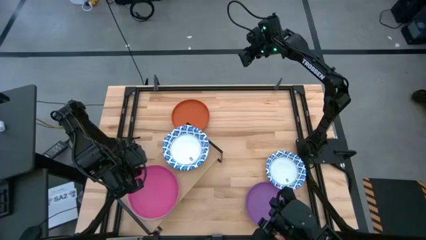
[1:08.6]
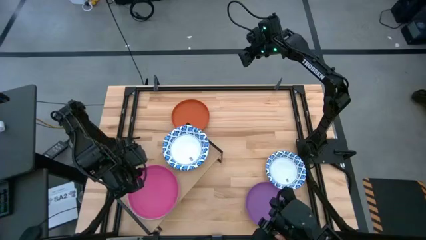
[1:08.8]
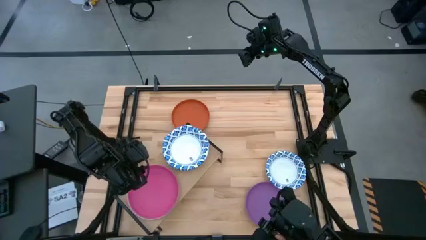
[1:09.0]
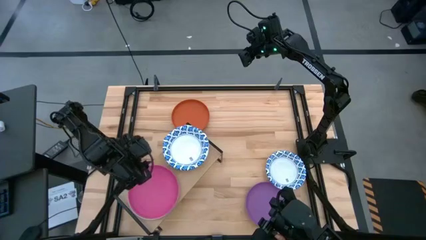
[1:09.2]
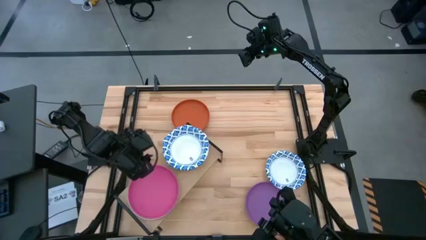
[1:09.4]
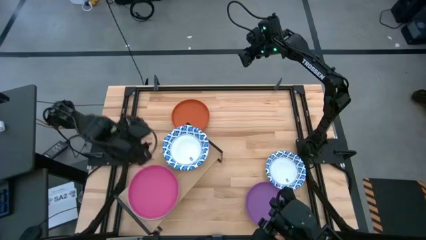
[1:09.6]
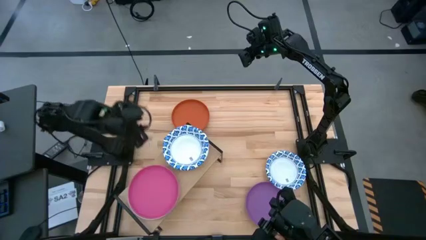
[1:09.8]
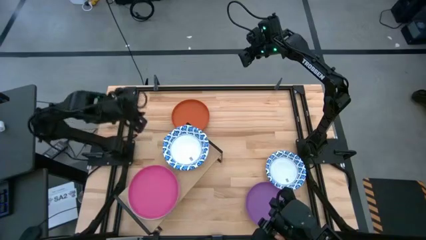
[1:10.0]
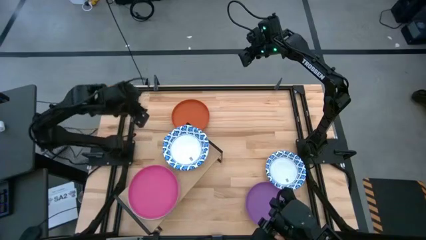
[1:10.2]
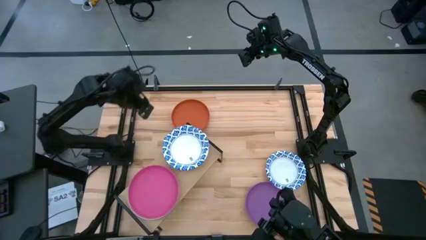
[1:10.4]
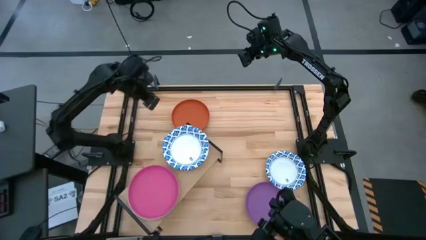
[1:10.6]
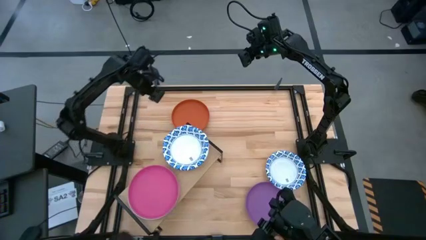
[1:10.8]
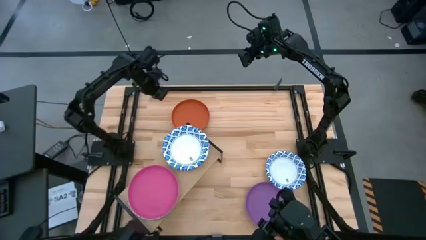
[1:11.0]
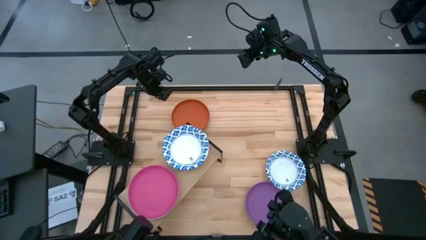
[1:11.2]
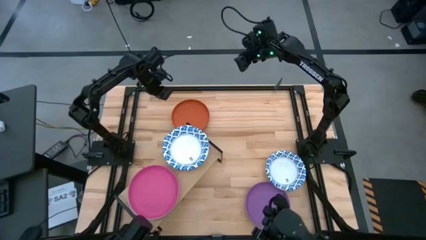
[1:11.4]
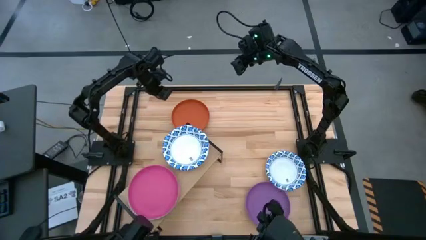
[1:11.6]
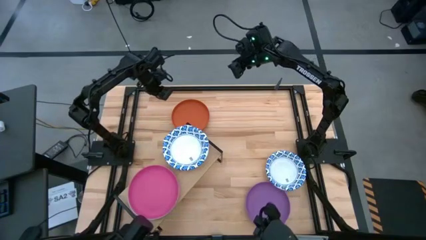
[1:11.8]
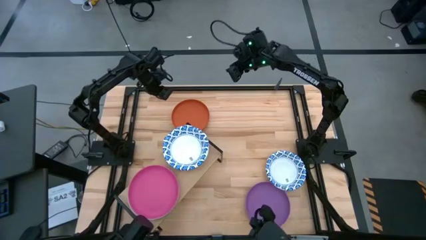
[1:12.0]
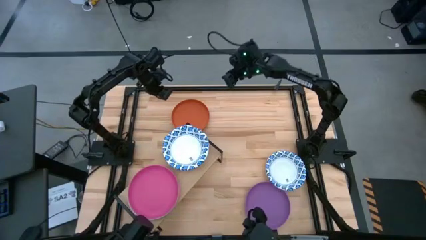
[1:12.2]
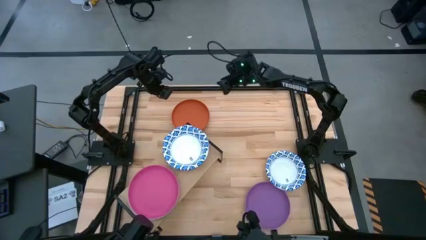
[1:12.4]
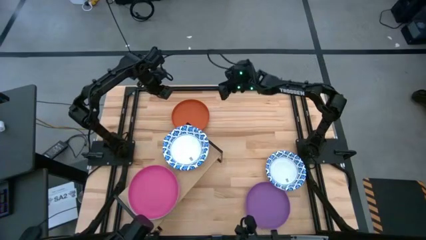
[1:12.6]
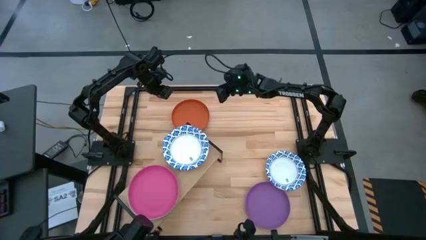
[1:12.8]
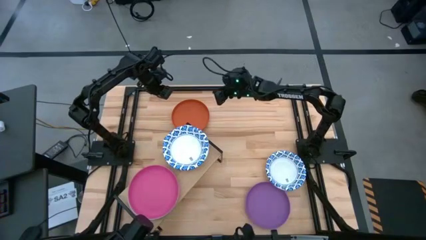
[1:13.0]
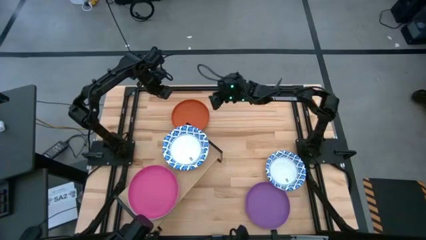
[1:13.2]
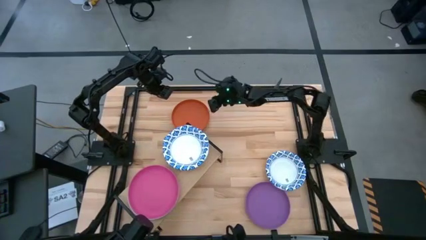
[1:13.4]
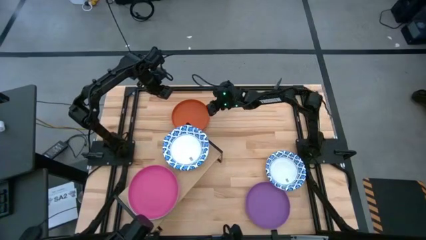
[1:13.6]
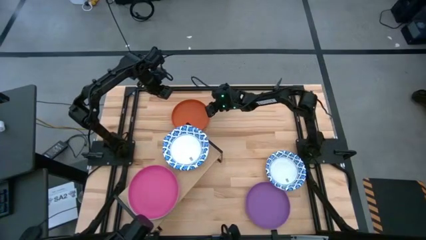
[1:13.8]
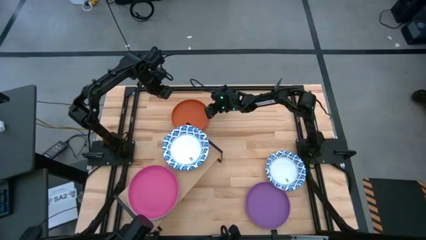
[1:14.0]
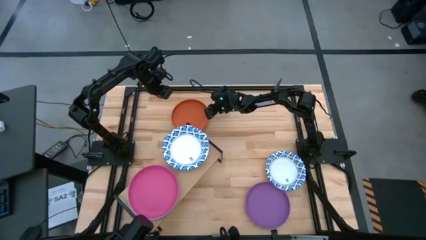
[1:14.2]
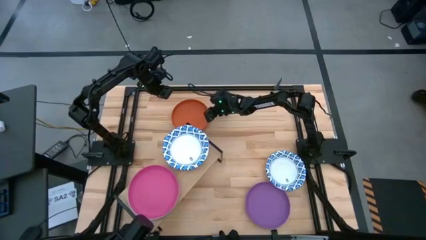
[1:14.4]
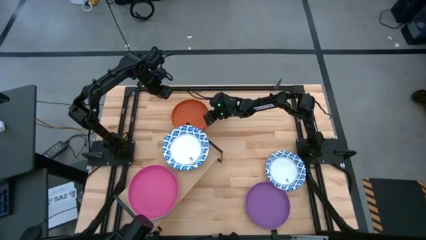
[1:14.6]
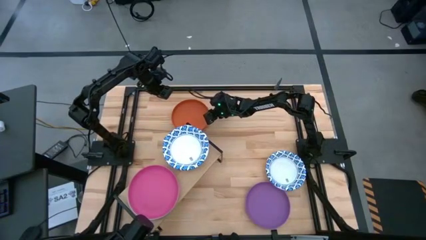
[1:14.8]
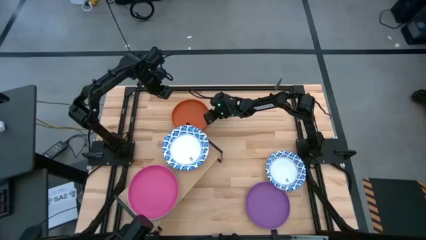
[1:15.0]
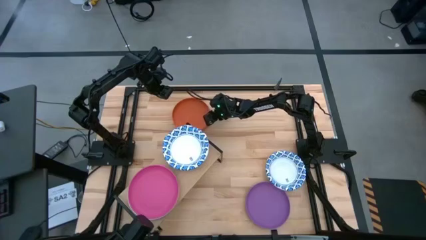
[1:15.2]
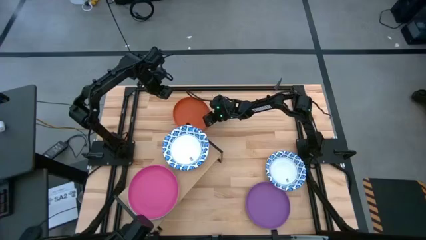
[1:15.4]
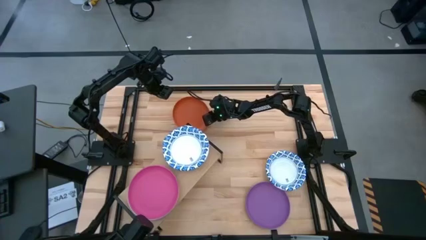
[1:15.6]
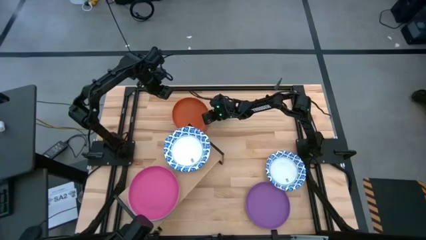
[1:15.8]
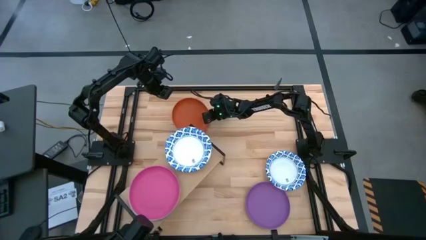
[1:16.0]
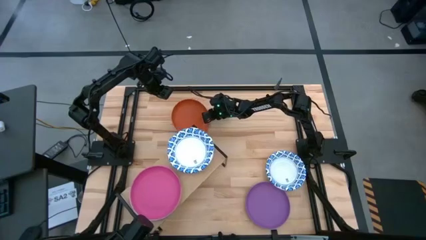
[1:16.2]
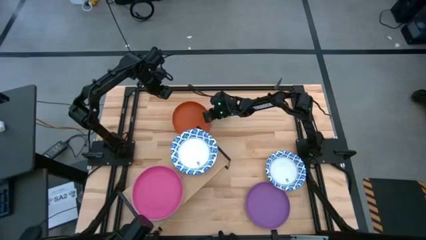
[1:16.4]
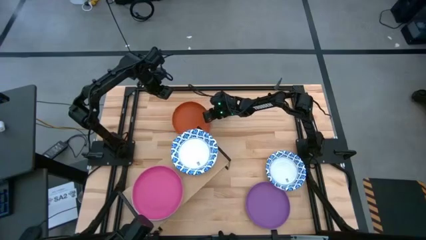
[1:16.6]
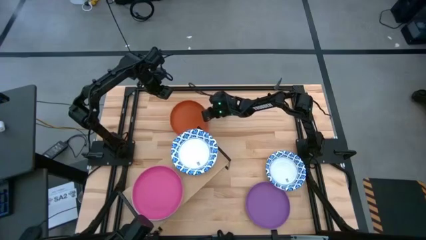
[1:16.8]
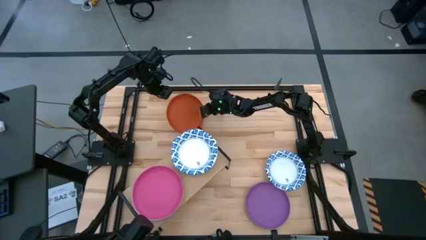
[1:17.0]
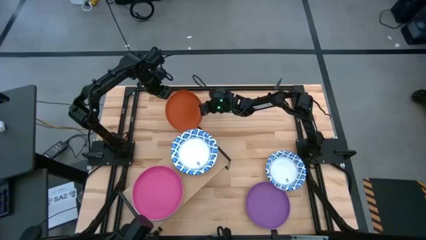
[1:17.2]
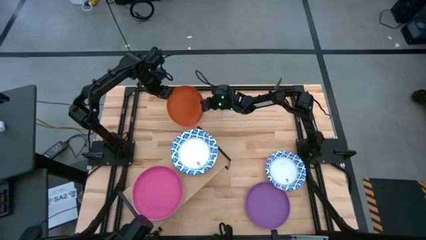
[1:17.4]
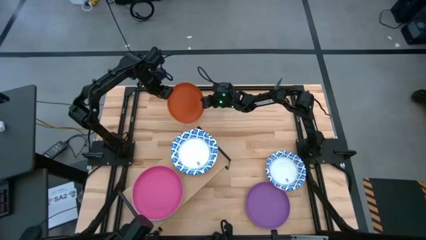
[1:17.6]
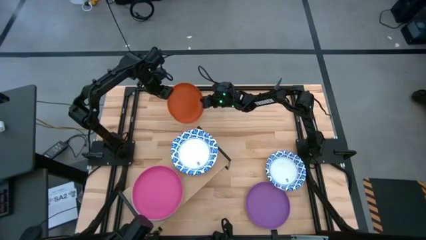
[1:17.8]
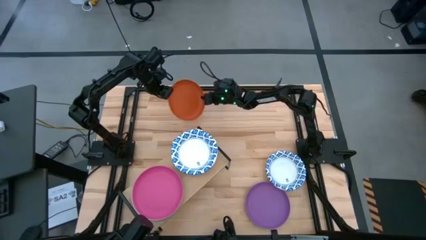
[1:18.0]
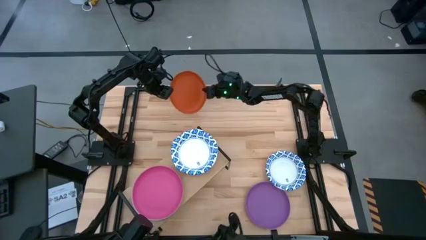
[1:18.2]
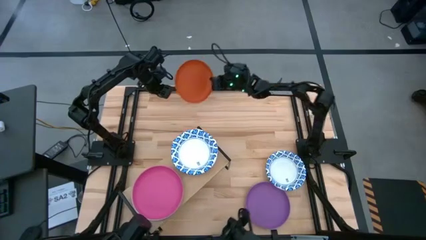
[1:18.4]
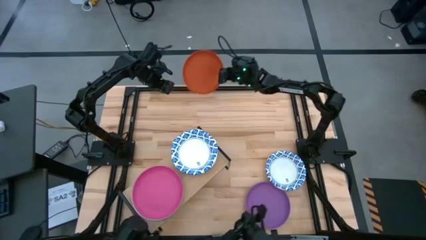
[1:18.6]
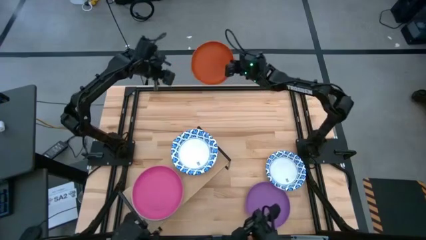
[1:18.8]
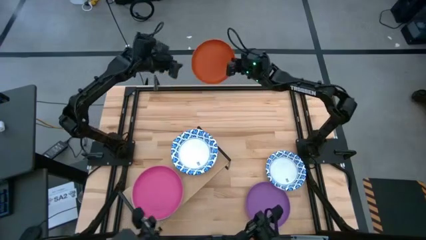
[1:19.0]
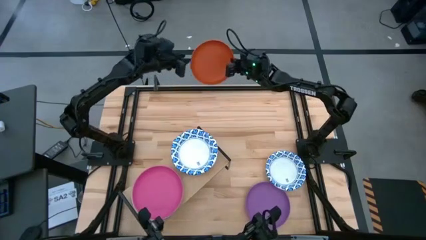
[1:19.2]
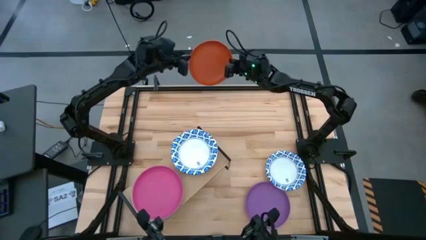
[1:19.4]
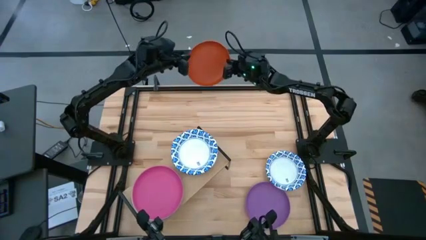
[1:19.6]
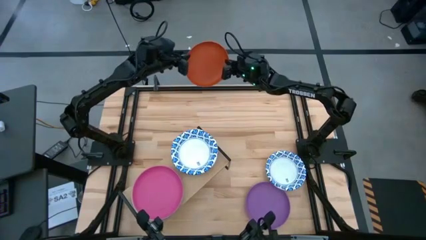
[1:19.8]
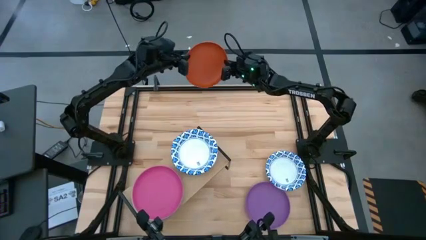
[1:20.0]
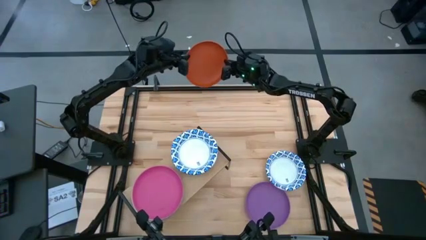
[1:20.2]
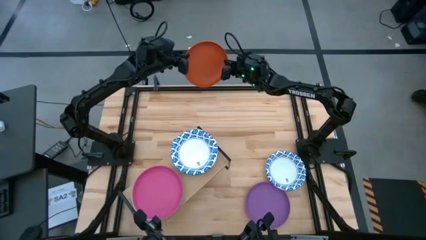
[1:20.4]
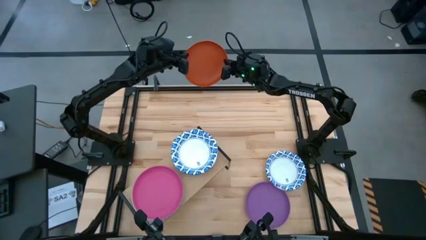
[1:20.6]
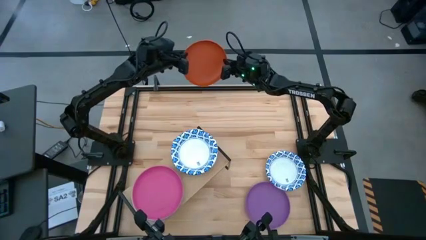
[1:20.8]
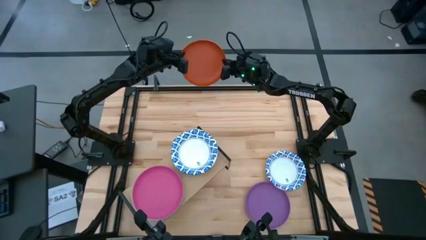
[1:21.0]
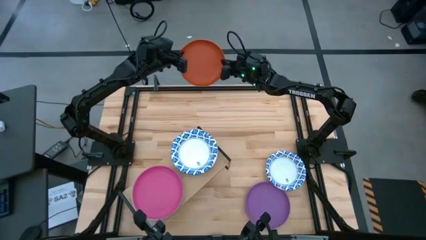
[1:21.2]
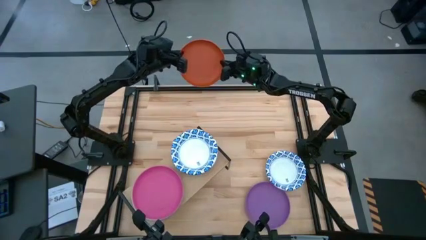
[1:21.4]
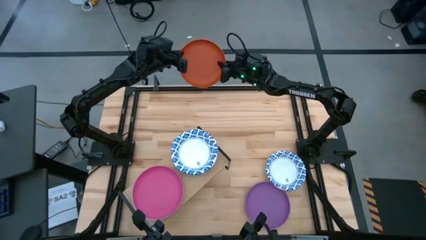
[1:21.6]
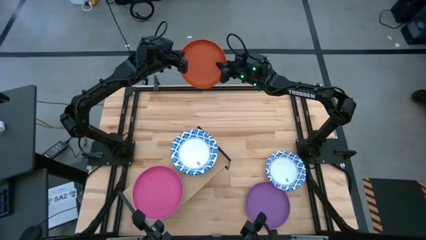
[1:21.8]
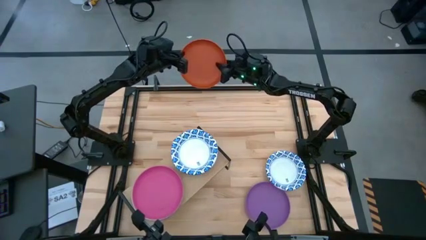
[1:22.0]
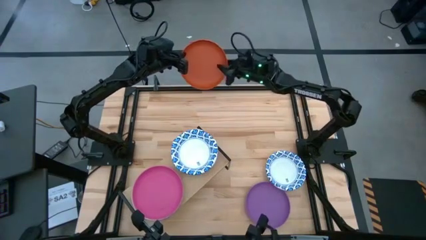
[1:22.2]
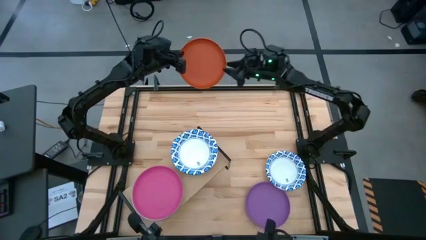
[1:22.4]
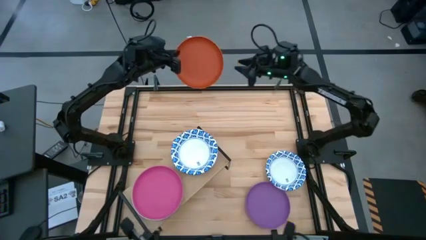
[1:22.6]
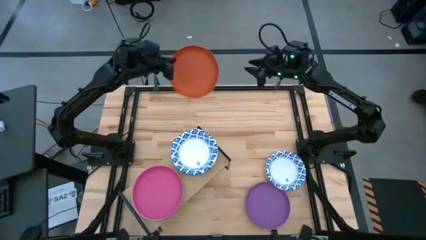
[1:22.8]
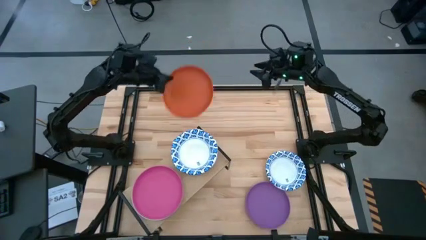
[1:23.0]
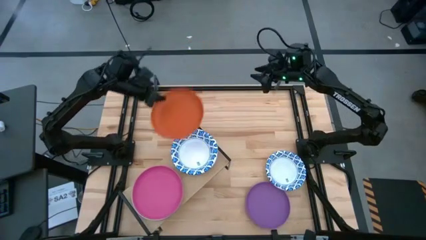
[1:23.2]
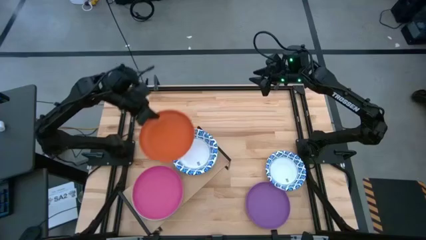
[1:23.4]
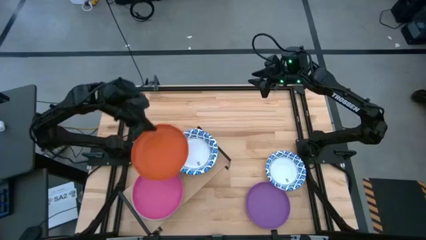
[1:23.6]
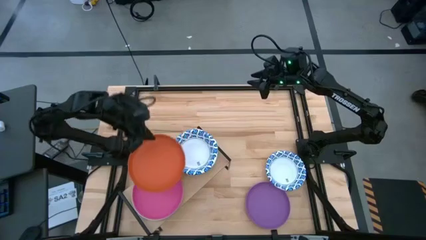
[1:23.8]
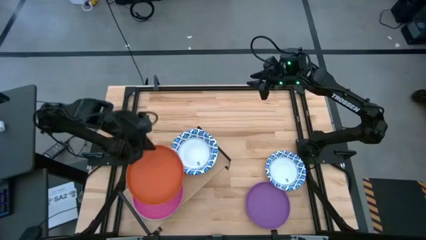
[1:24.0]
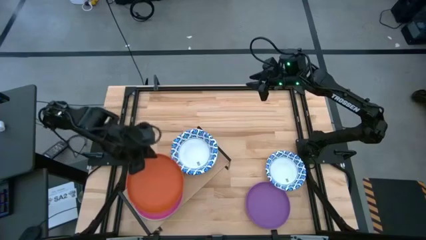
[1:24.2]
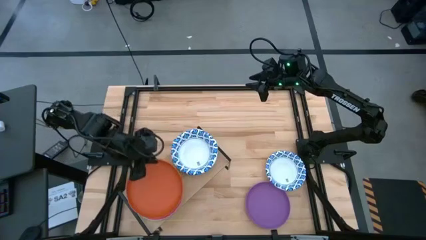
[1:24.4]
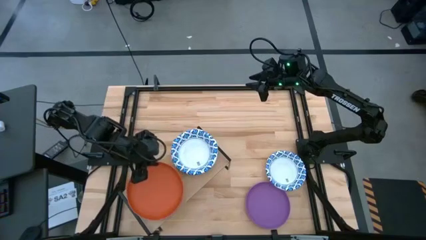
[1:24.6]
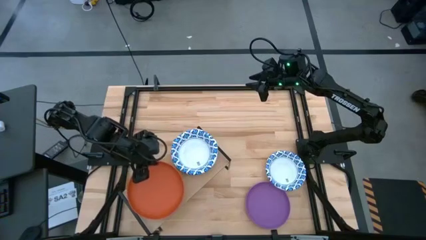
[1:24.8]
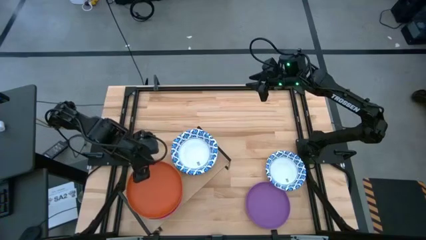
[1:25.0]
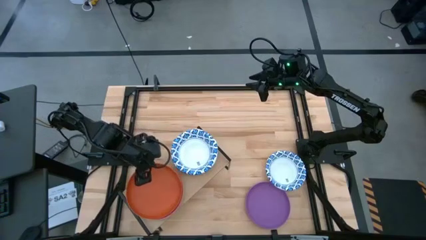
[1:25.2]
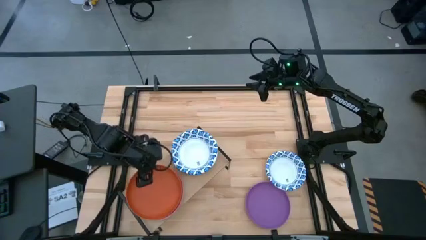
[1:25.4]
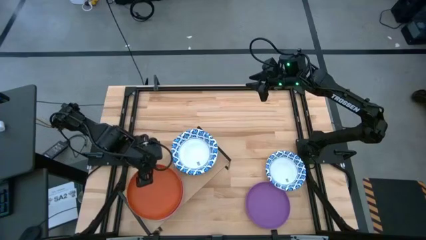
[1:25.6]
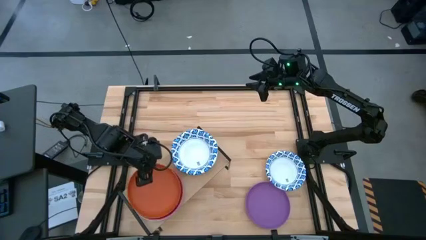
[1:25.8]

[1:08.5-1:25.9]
Task: Place and stack plates onto a shelf
Stack the orange plate on top of the pink plate on the shelf
